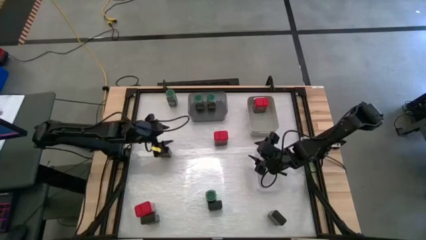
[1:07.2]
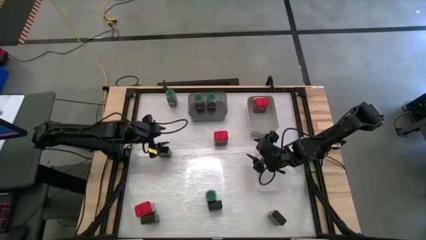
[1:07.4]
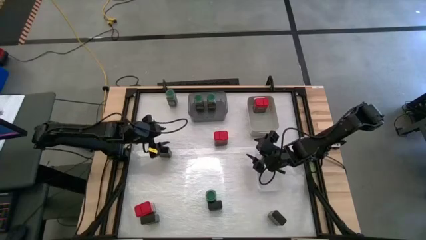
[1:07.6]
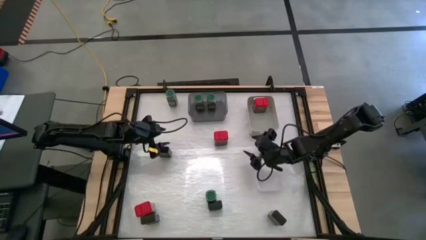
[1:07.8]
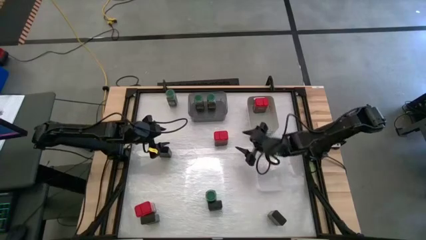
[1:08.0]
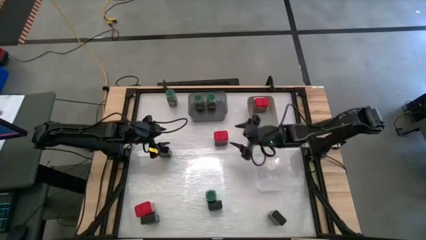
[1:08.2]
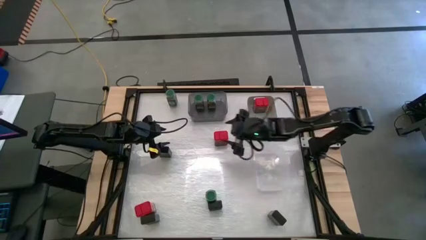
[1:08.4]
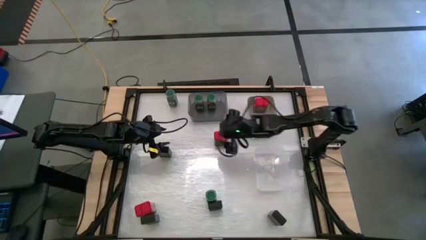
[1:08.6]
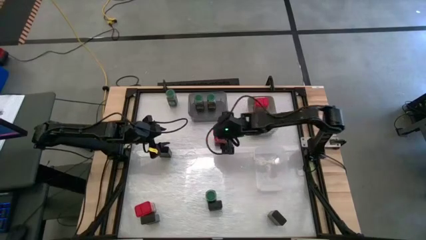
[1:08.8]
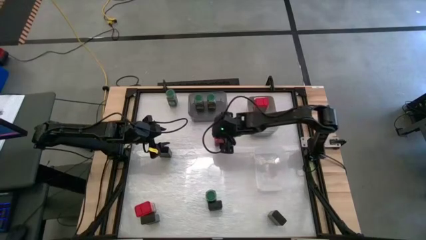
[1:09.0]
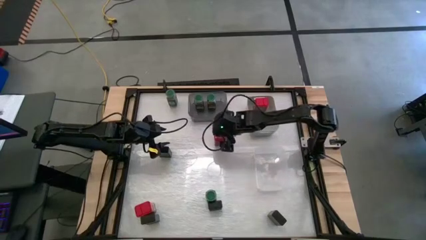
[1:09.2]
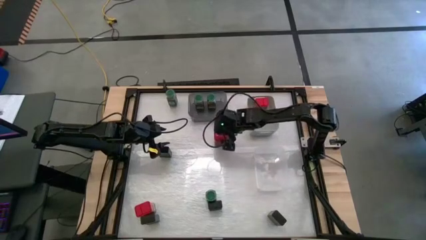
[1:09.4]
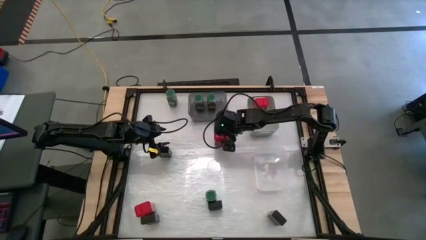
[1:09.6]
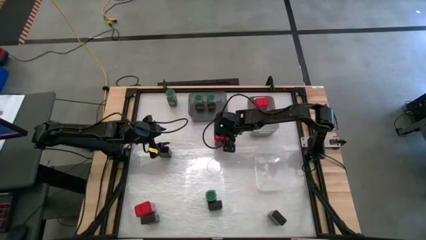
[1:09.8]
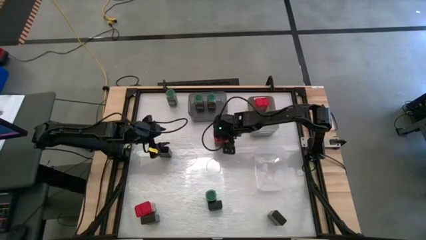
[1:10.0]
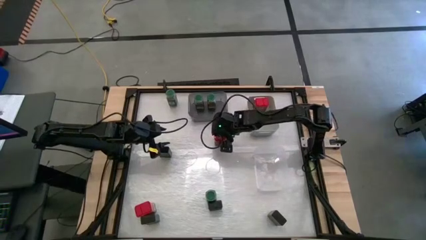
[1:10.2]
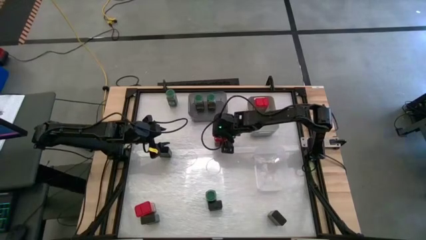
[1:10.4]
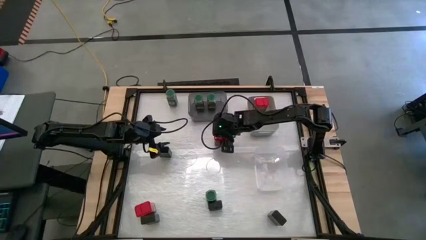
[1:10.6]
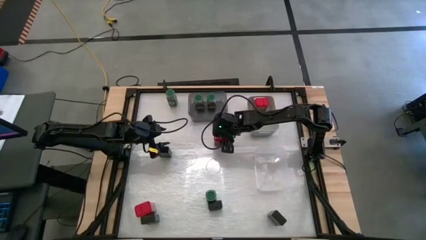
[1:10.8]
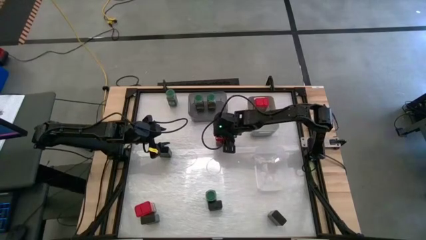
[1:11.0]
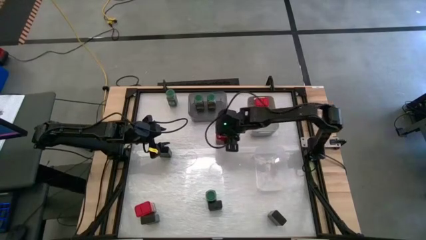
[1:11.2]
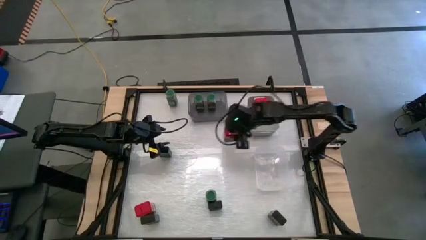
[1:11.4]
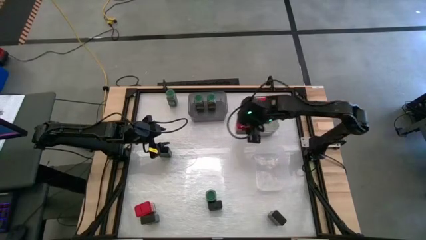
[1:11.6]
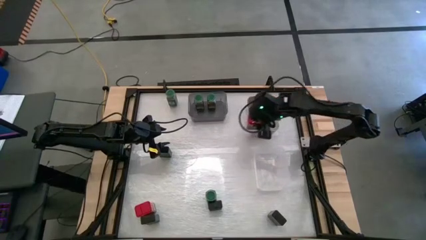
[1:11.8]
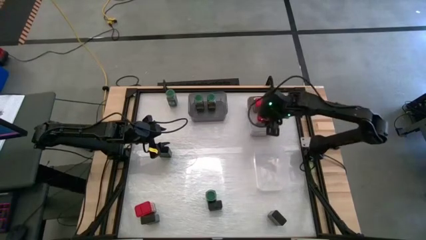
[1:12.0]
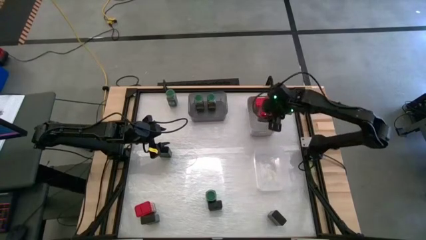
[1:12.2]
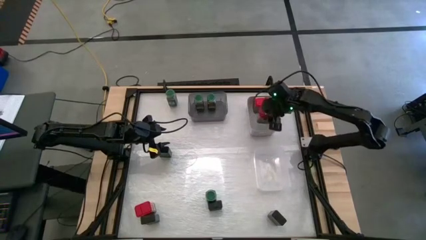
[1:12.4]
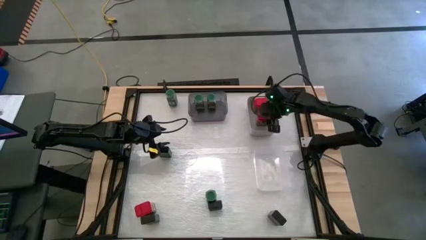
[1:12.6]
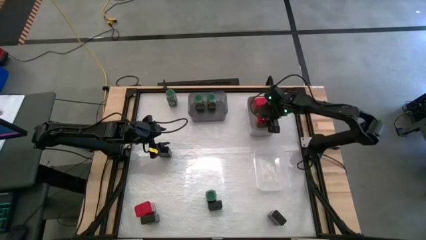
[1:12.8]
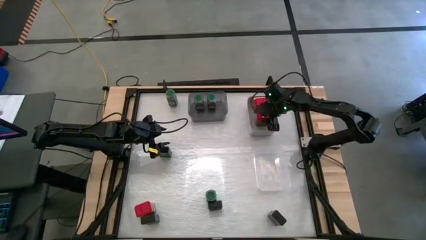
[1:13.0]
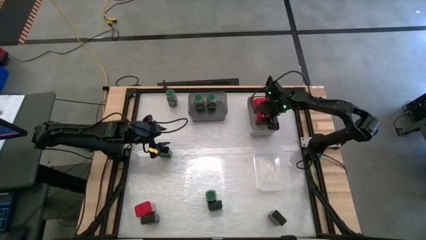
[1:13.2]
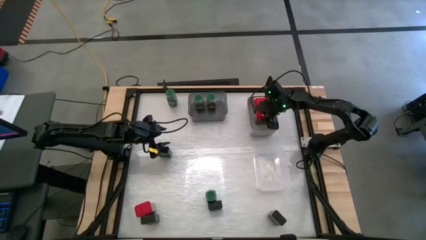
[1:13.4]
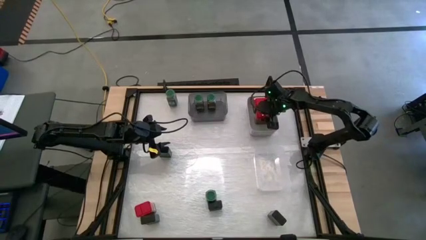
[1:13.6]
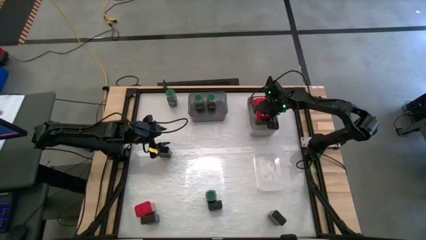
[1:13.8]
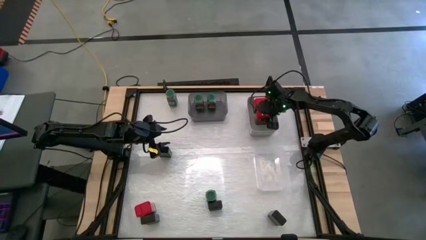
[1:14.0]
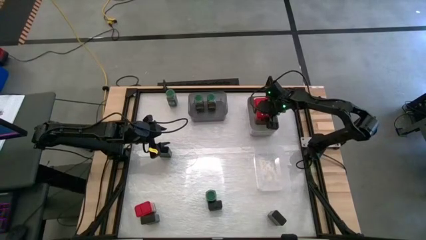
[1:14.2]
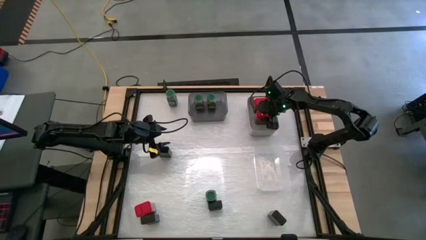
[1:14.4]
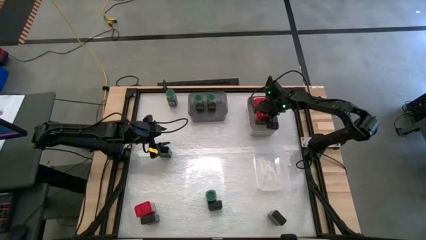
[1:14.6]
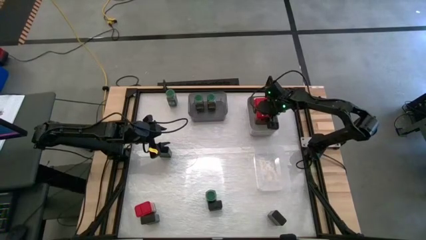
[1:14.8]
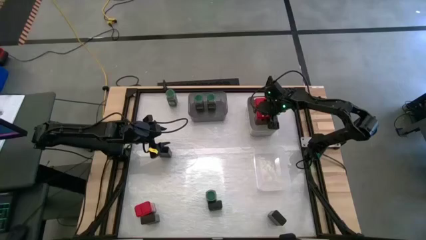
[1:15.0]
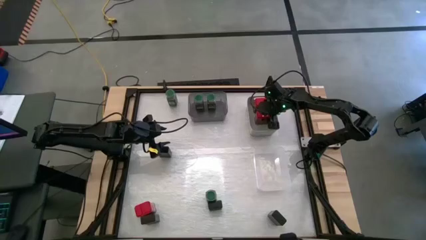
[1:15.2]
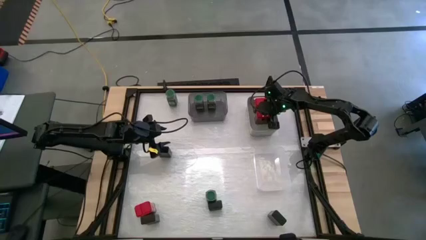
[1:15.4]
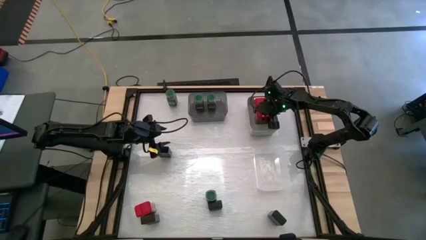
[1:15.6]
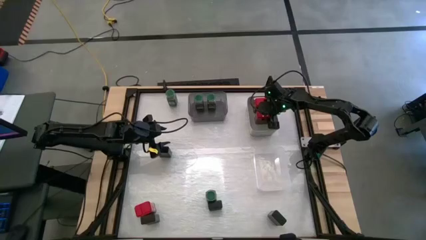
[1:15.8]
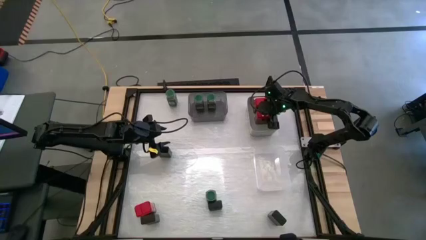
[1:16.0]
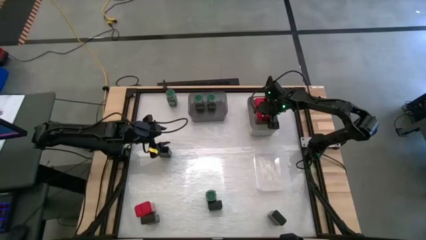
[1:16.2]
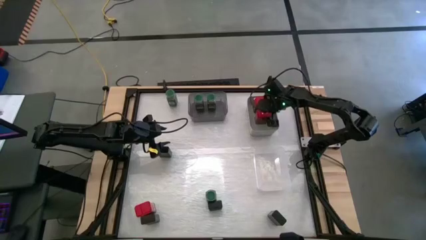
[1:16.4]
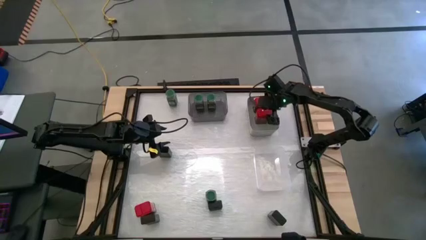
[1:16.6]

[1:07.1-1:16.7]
Task: Sort spices by type
Put the center red seasoning can into the gray bin

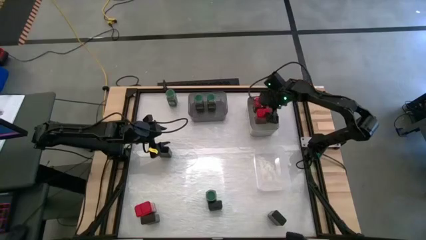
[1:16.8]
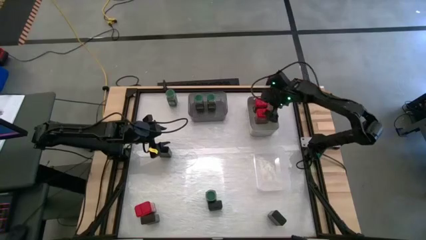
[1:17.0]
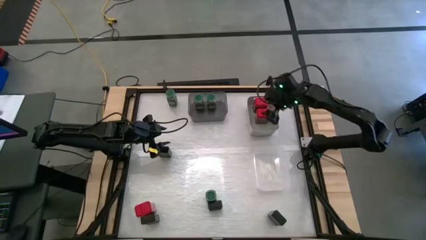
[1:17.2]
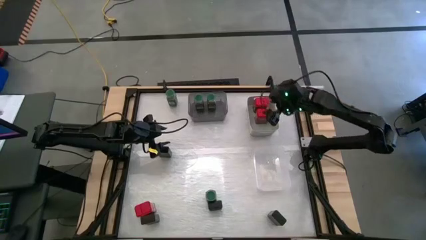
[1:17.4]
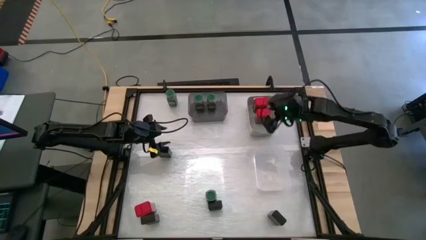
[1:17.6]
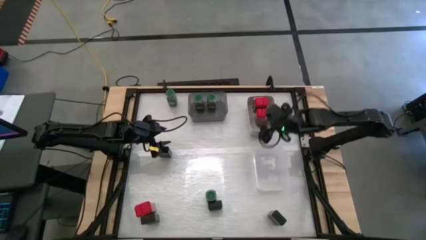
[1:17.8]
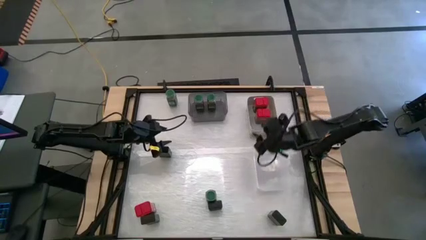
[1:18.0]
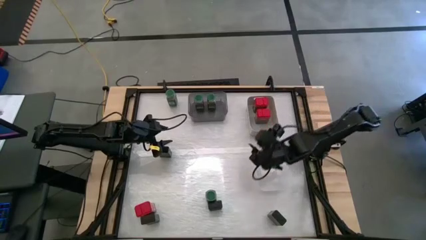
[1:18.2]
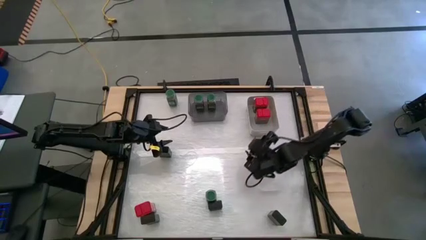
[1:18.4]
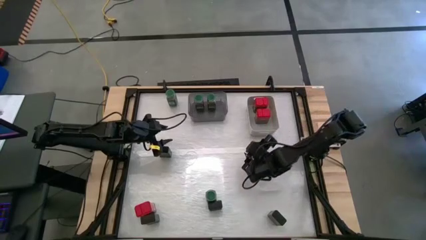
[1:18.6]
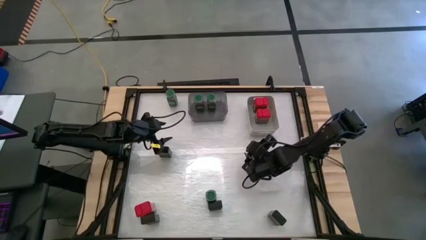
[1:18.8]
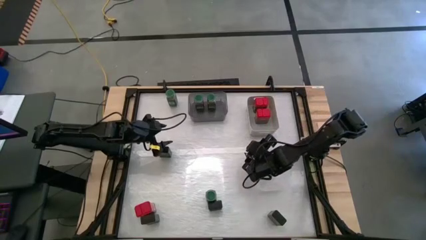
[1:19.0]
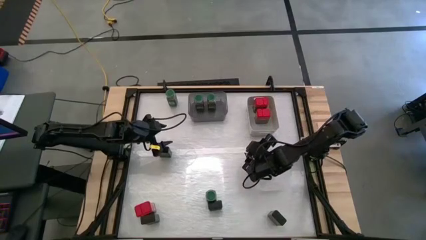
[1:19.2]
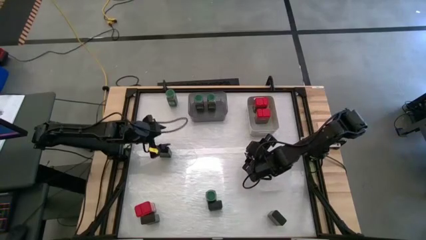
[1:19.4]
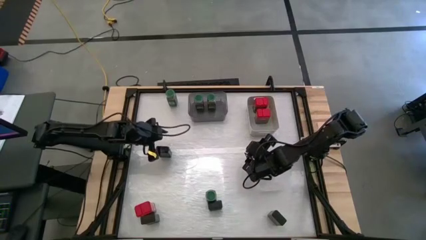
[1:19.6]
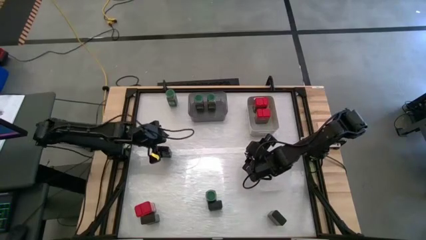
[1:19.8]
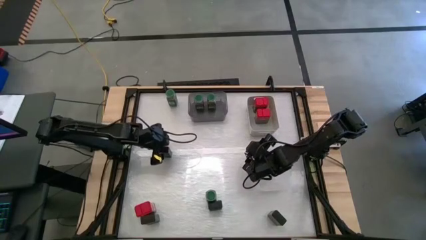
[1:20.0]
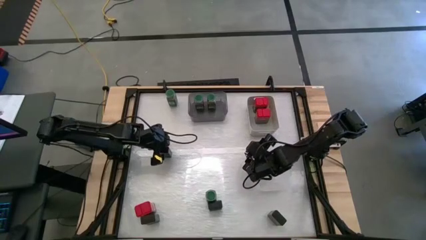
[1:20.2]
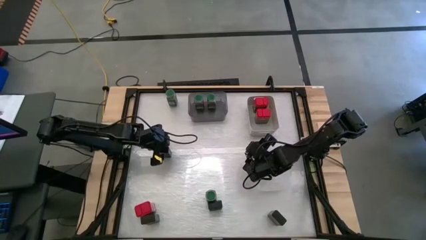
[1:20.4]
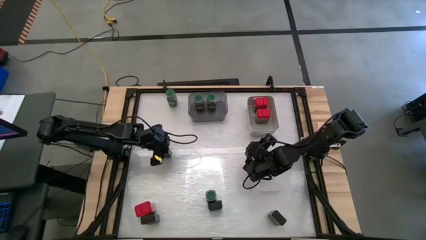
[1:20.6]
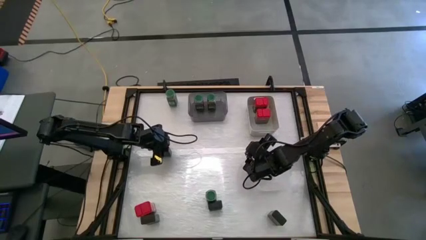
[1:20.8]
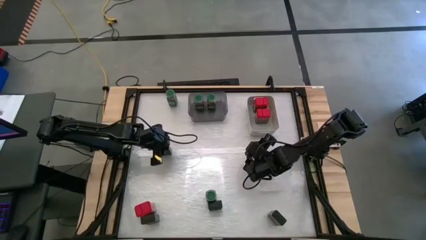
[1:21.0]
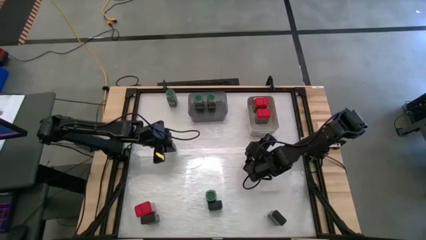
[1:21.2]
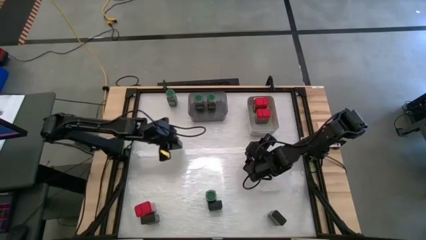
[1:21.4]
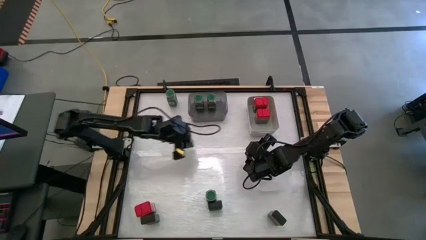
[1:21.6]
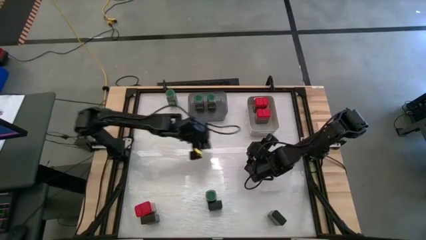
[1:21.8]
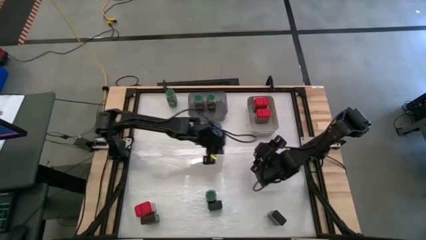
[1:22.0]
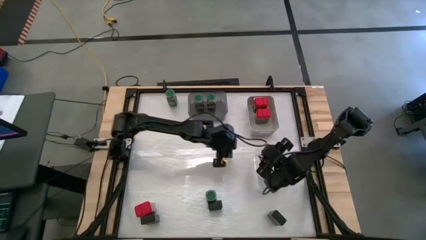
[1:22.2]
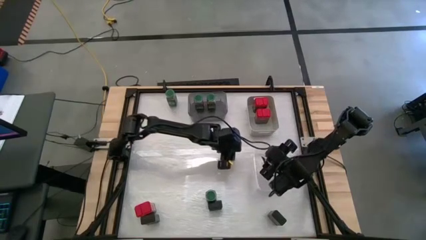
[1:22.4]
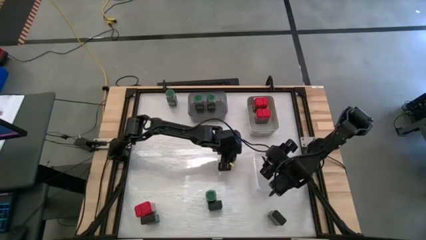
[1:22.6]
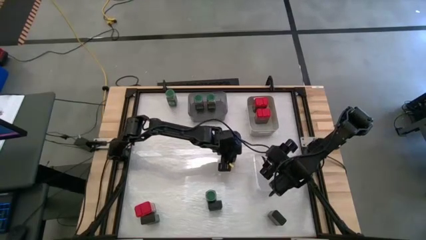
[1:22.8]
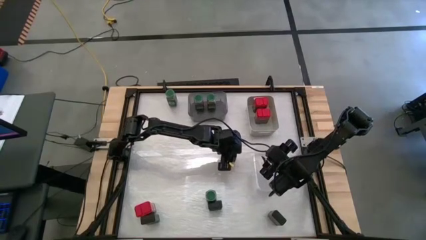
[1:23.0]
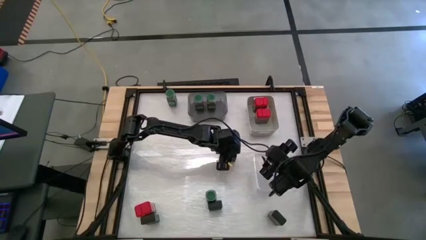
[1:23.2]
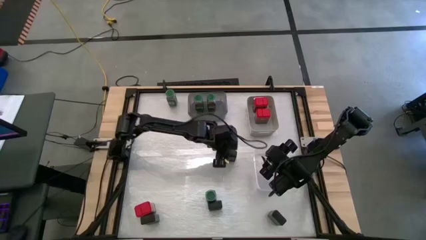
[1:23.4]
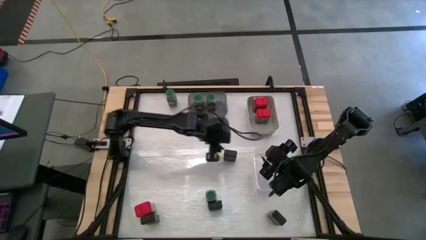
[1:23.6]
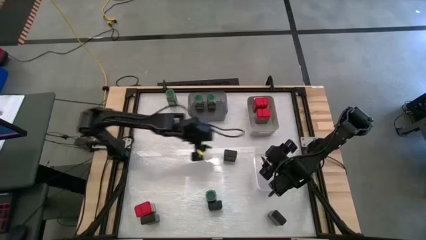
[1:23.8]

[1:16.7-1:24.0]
Move the middle left black seasoning can to the center of the table
